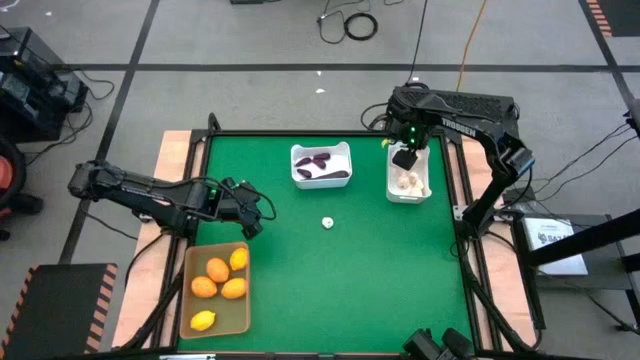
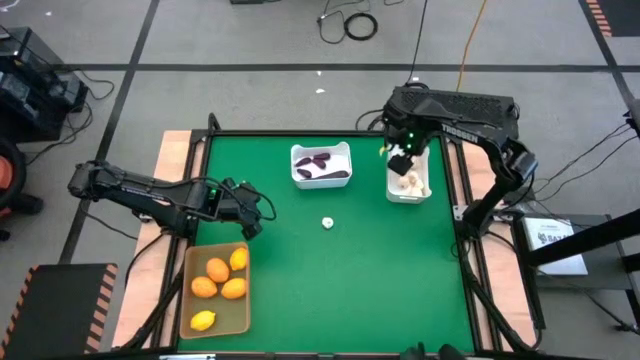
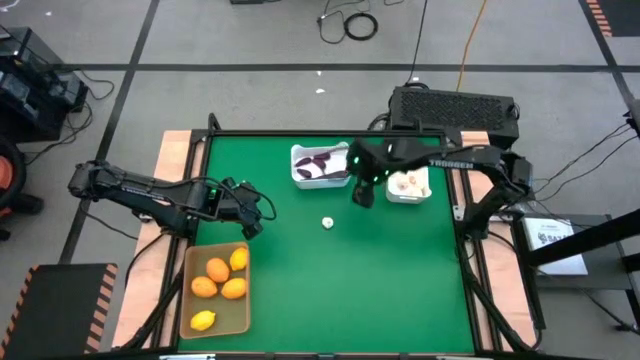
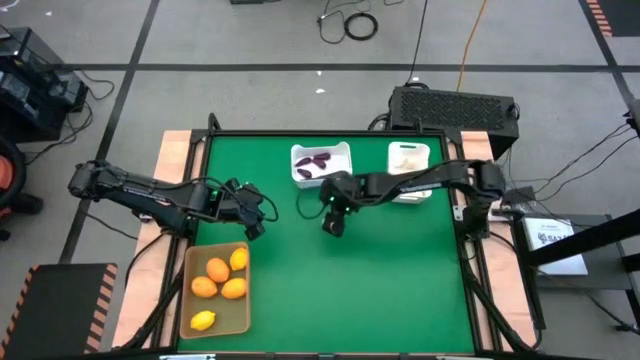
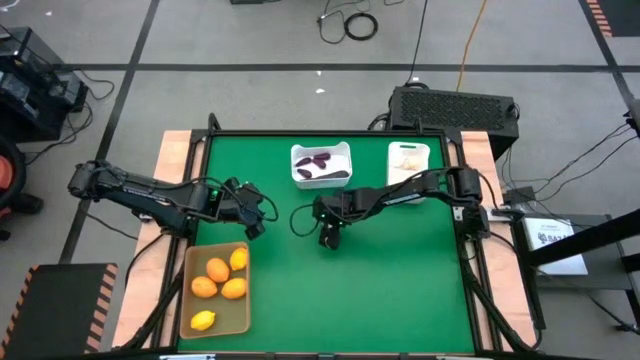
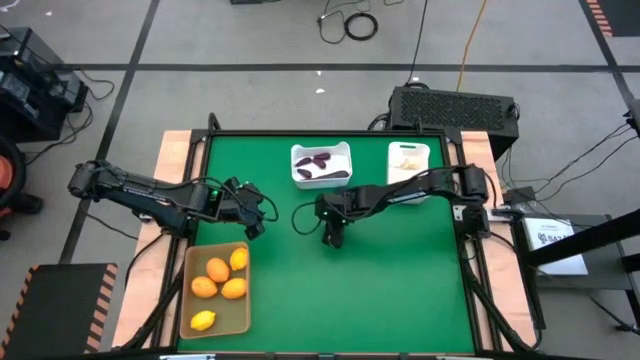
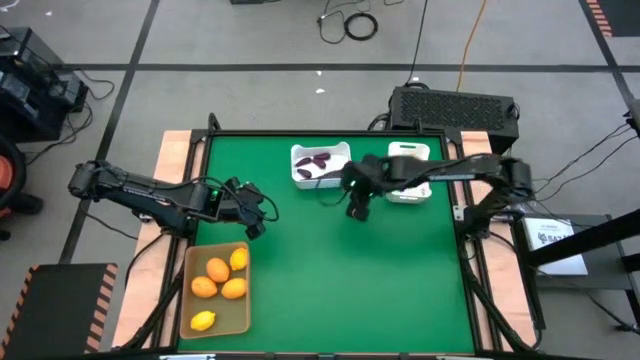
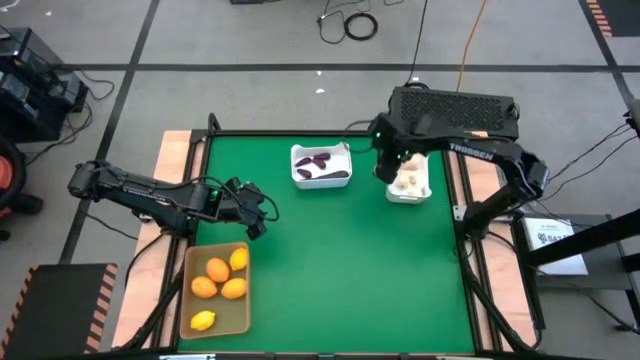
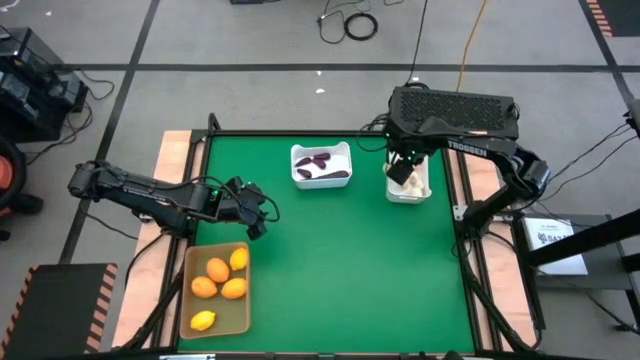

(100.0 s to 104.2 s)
Task: Sort produce into baskets
Put the white garlic into the right white bin

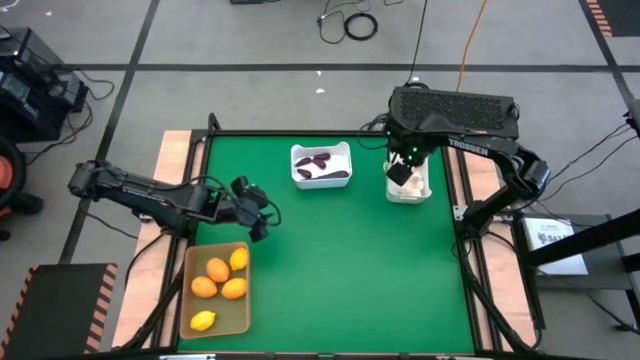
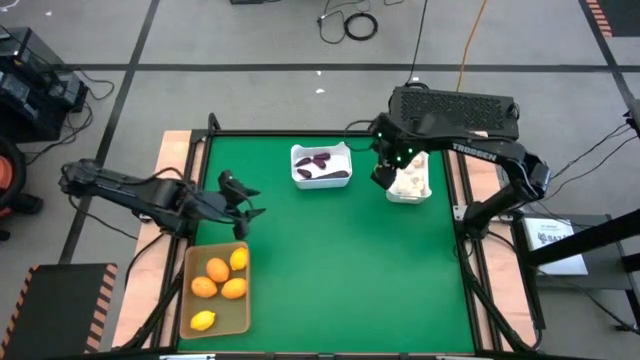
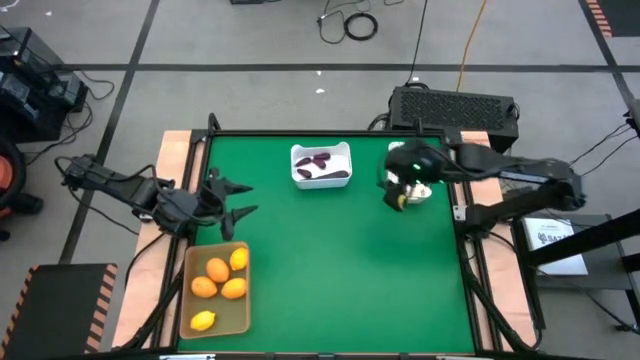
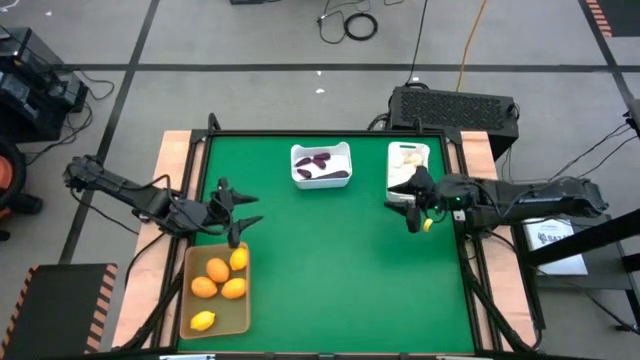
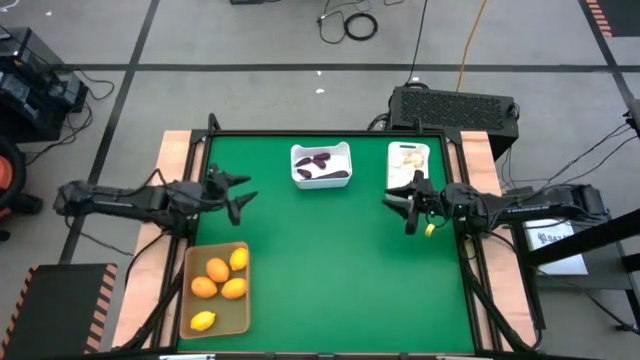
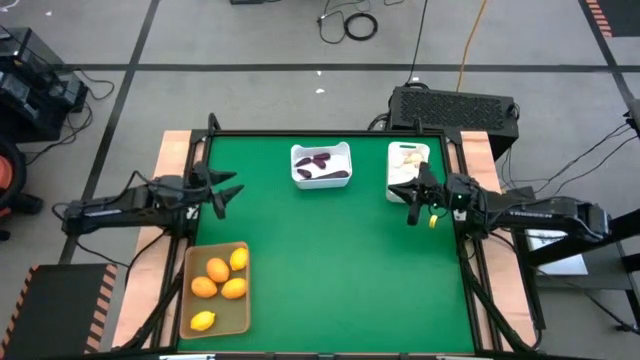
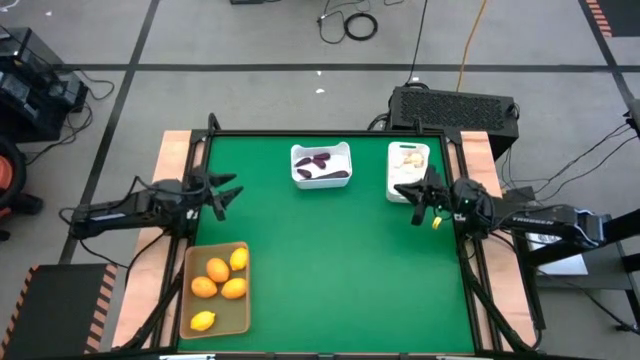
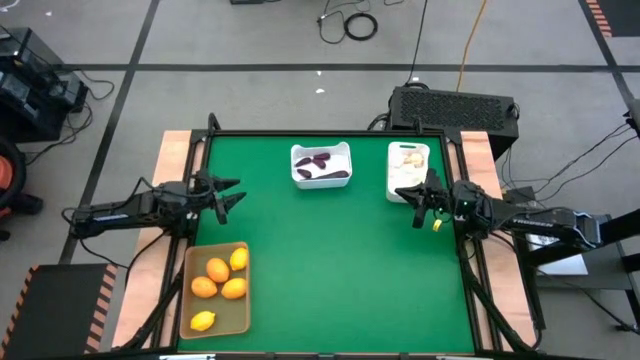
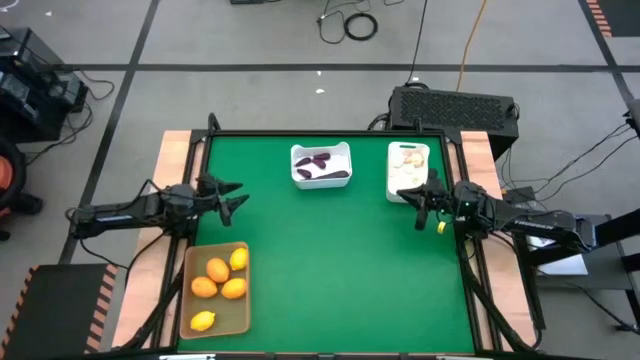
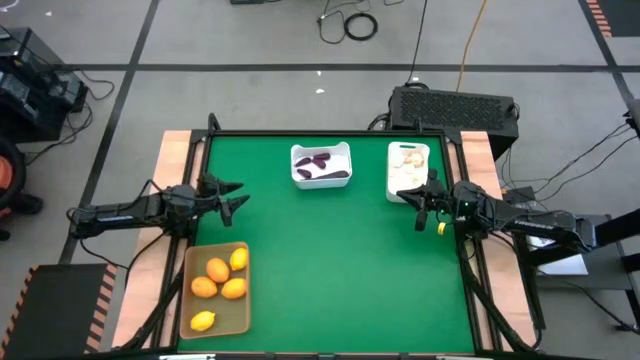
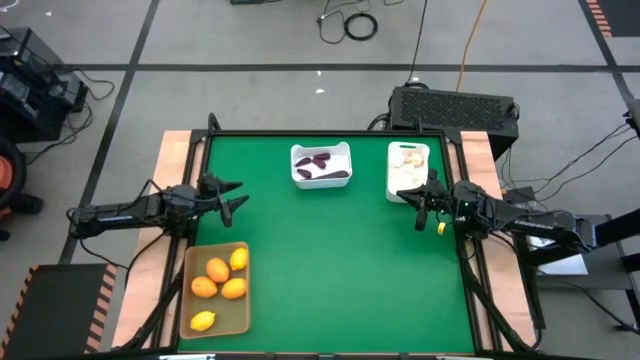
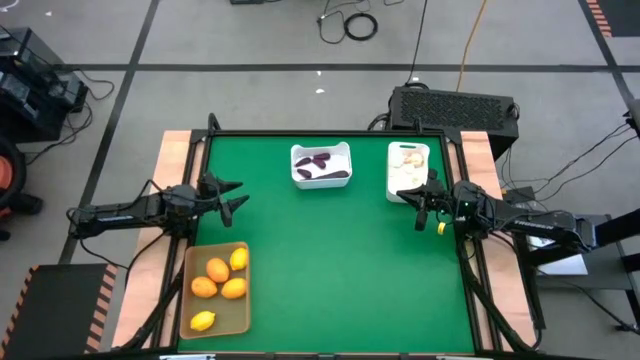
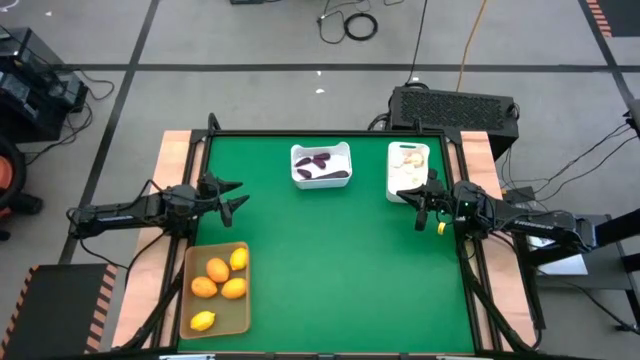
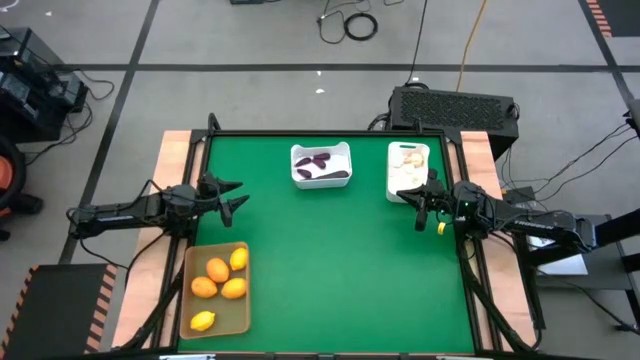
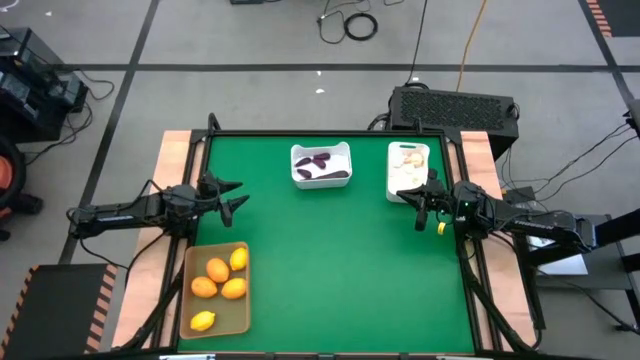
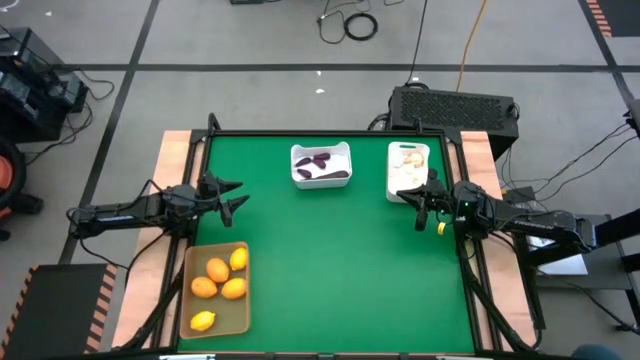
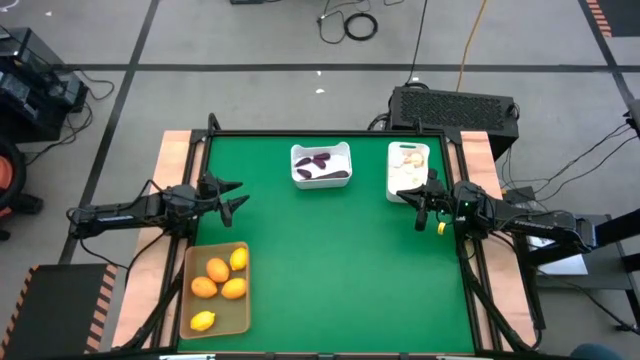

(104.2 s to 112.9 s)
Return to Home Position

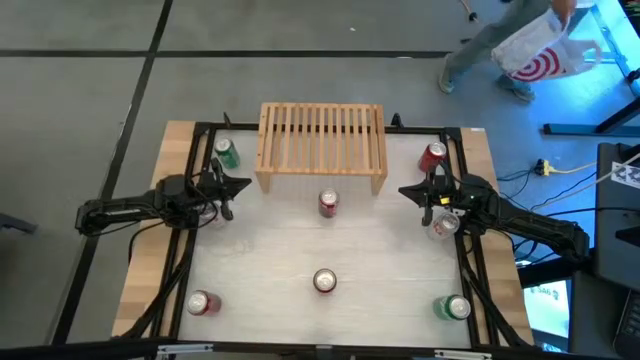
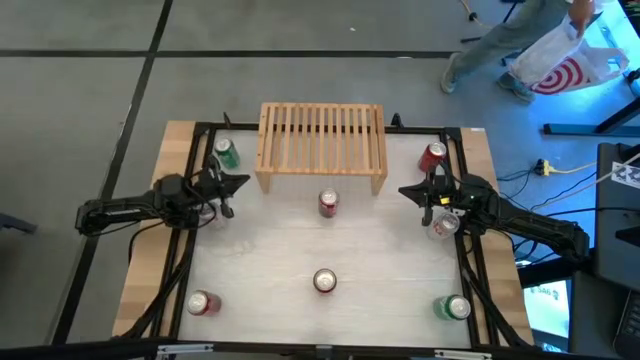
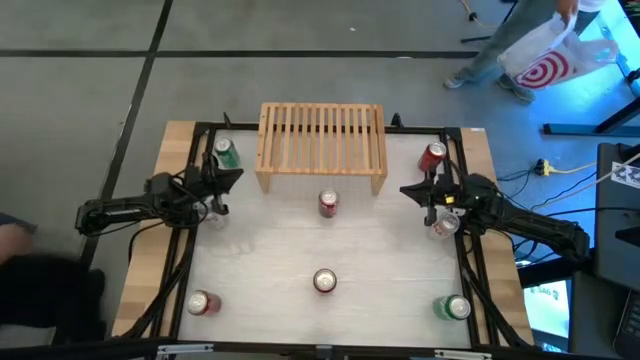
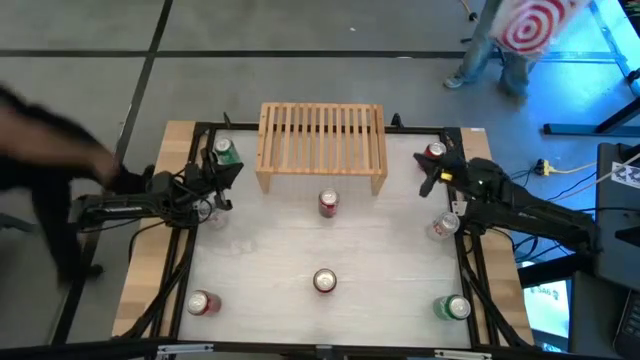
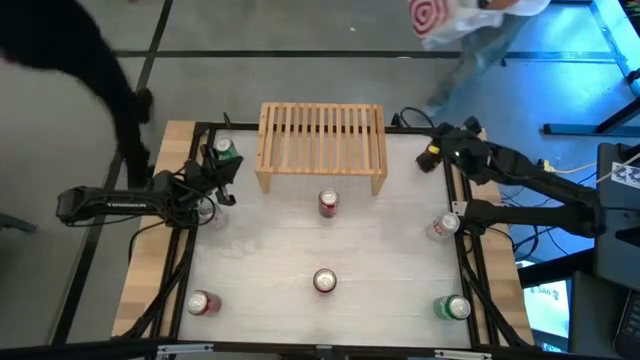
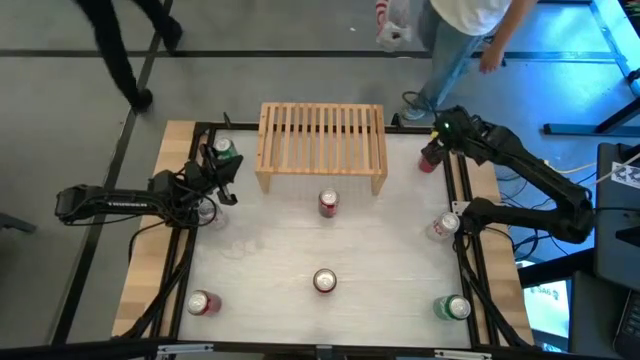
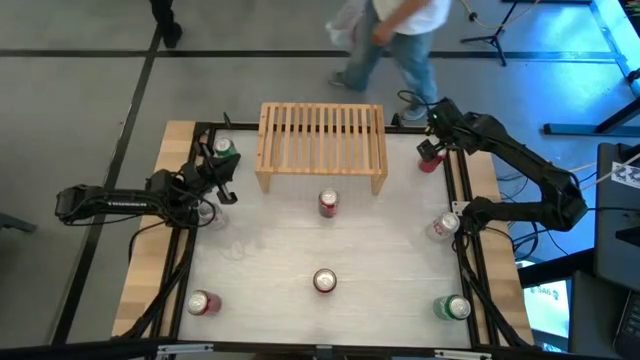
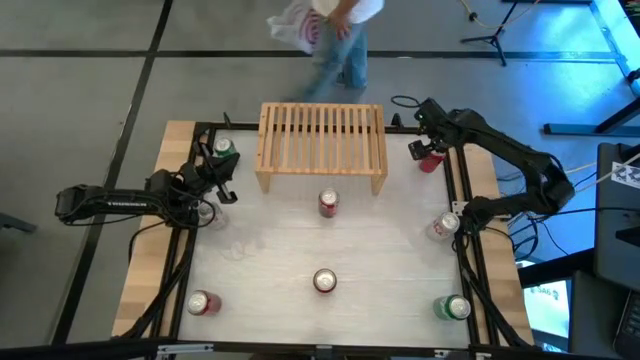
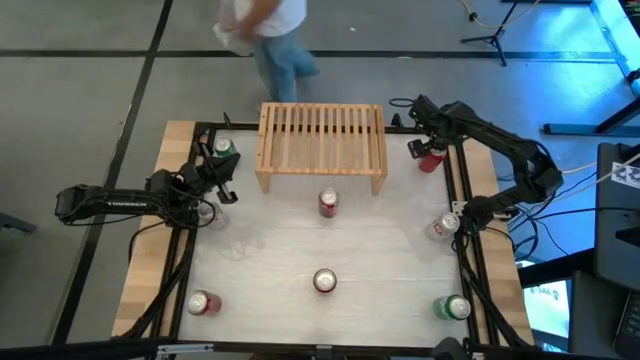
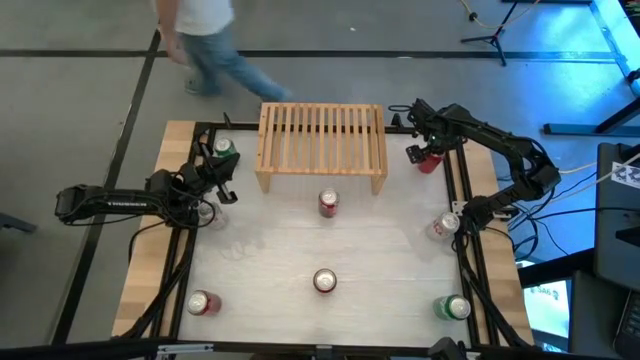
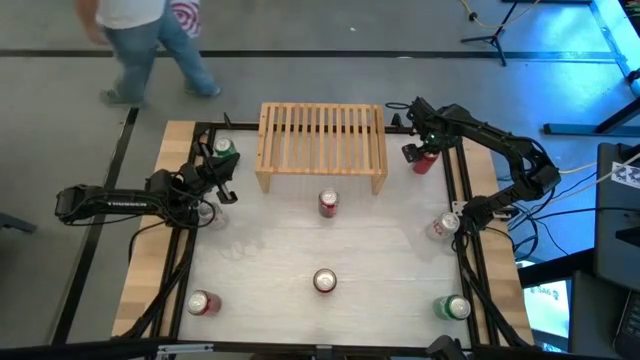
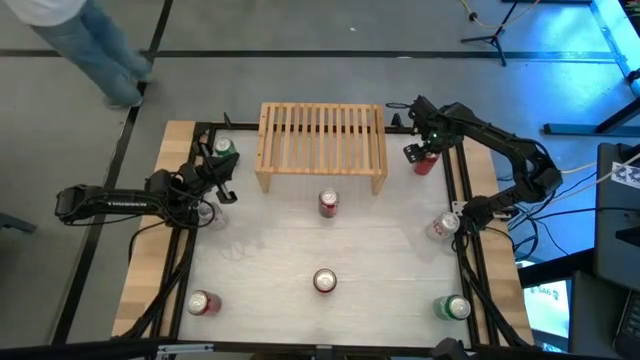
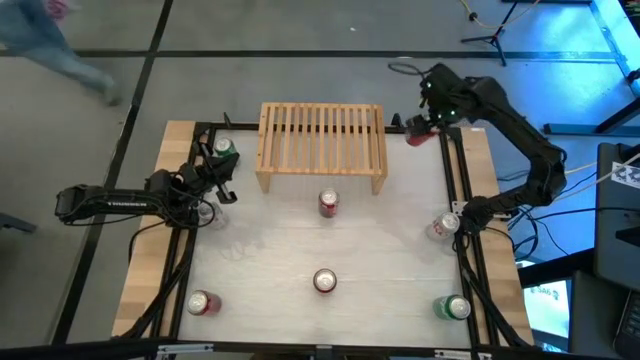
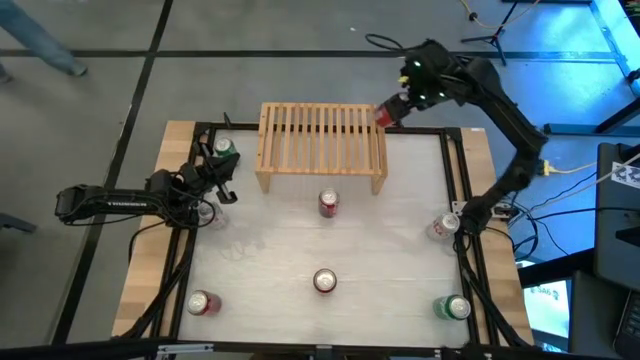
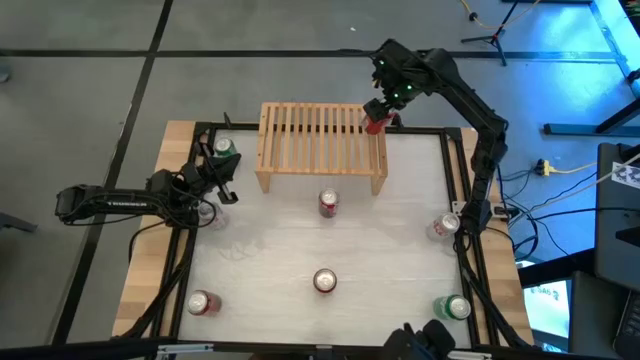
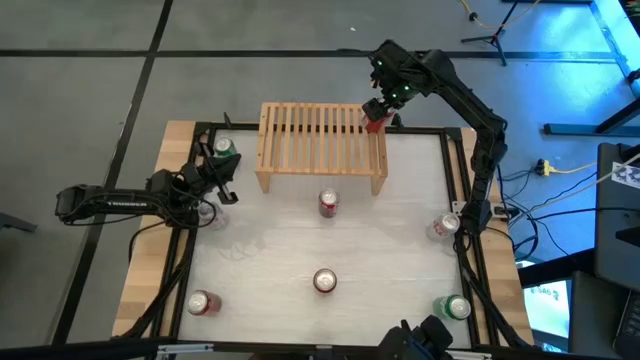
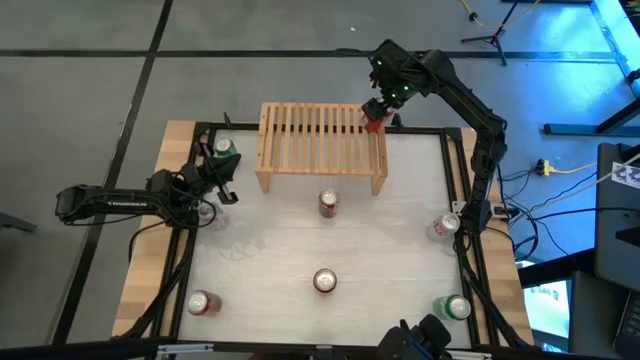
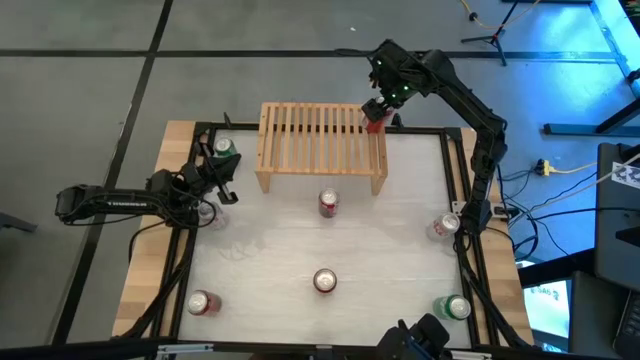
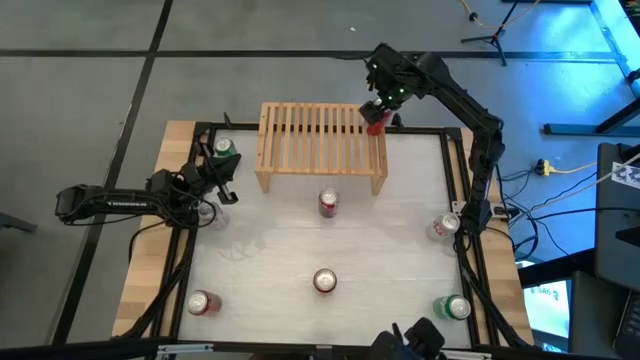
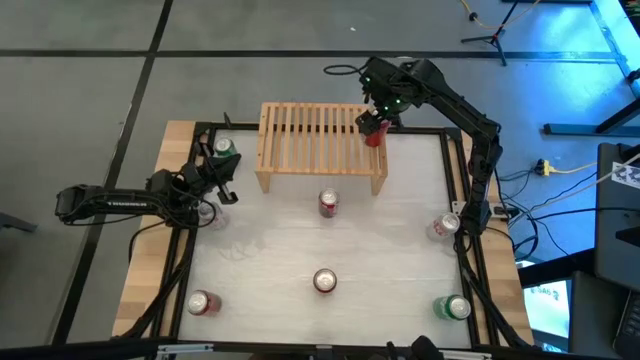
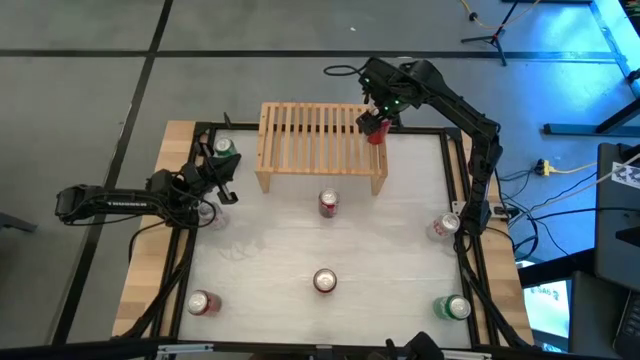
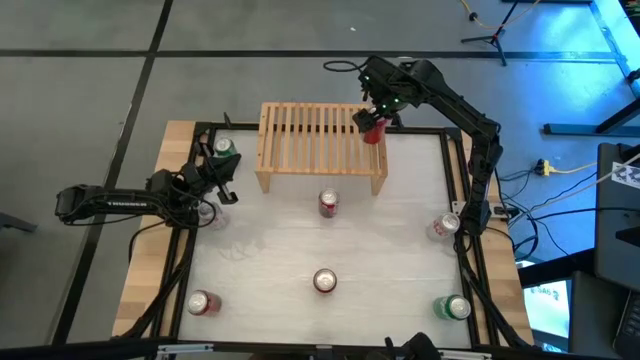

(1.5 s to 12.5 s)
Task: Place canned beverage on shelf
Put the top red soda can on the shelf
